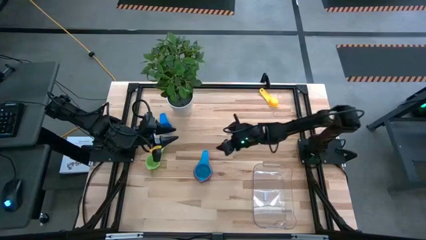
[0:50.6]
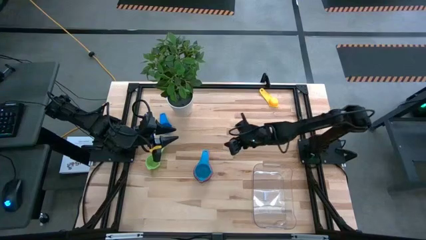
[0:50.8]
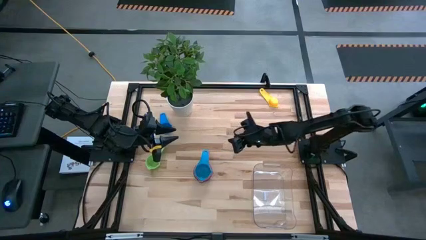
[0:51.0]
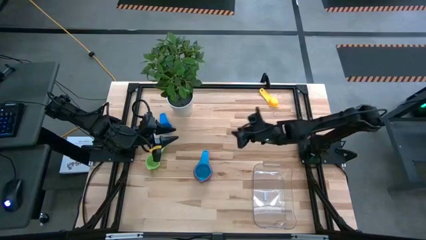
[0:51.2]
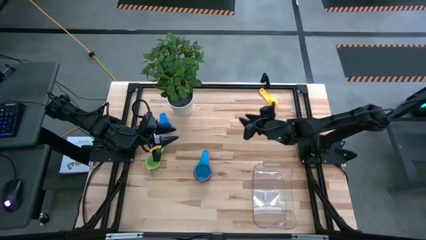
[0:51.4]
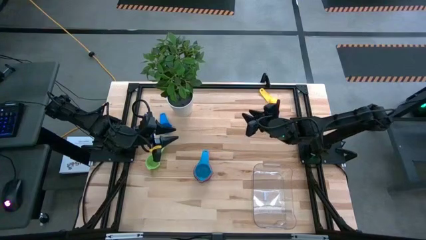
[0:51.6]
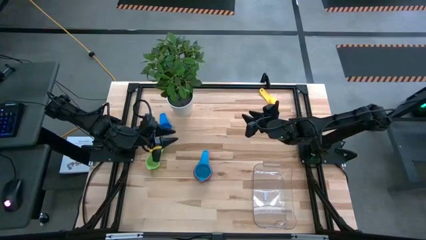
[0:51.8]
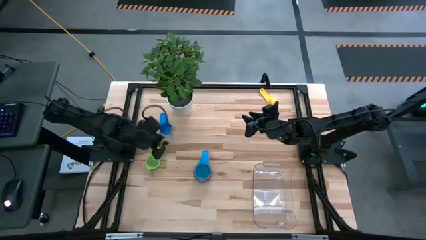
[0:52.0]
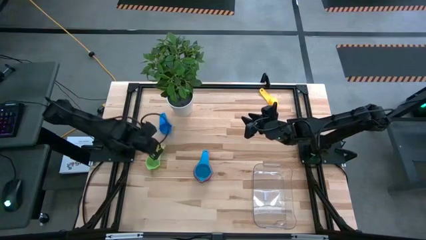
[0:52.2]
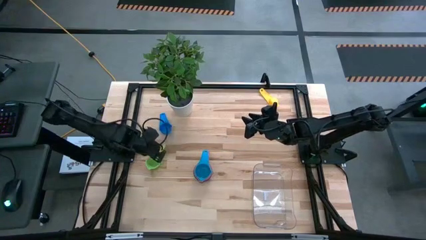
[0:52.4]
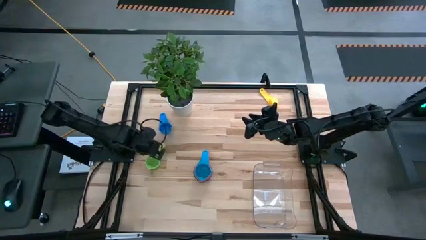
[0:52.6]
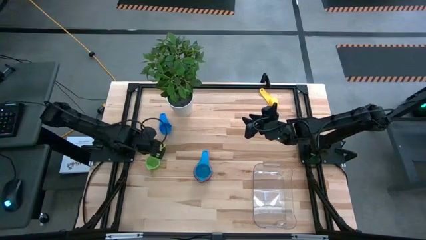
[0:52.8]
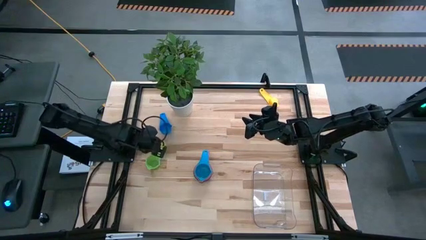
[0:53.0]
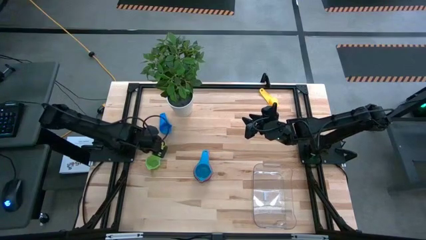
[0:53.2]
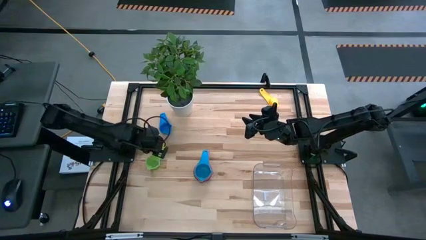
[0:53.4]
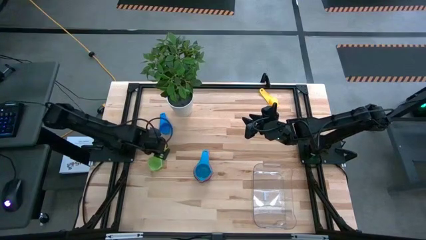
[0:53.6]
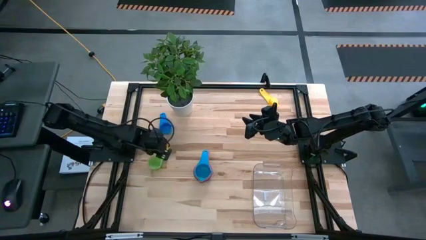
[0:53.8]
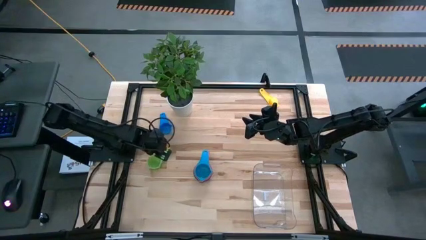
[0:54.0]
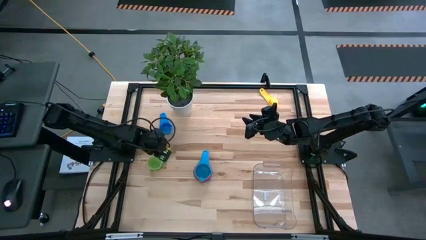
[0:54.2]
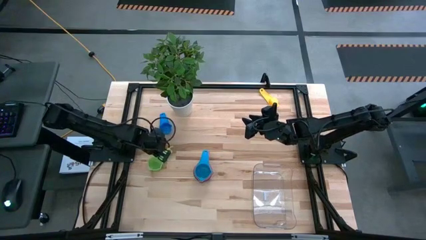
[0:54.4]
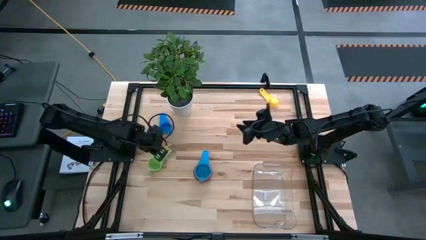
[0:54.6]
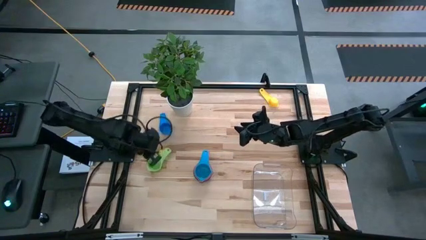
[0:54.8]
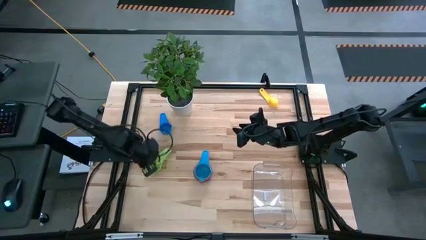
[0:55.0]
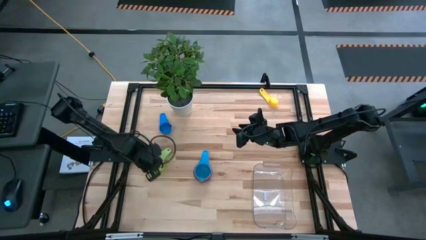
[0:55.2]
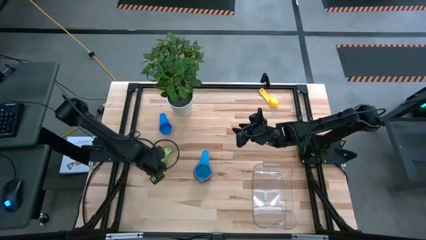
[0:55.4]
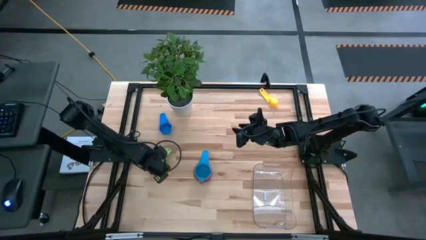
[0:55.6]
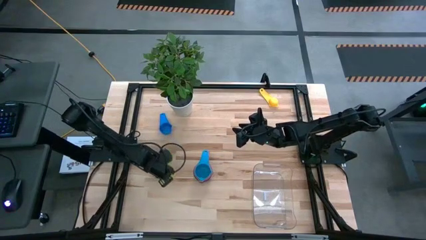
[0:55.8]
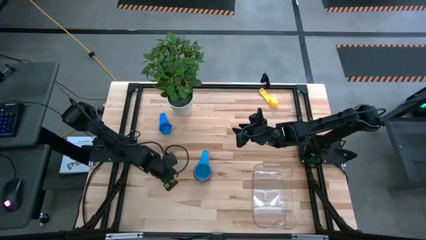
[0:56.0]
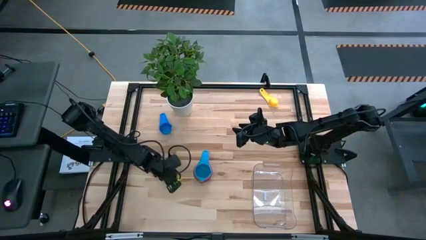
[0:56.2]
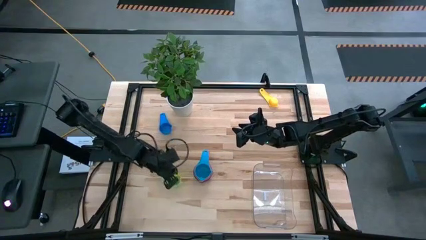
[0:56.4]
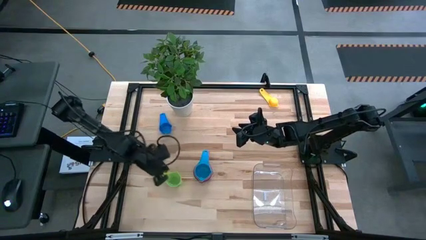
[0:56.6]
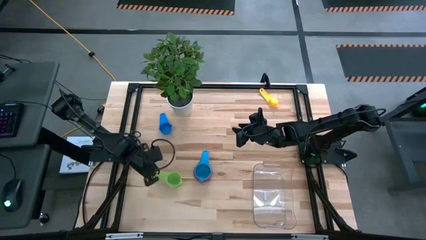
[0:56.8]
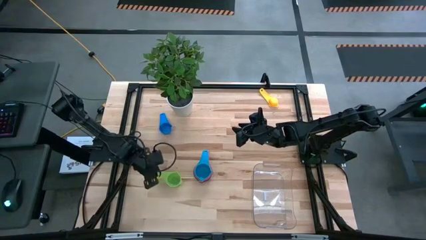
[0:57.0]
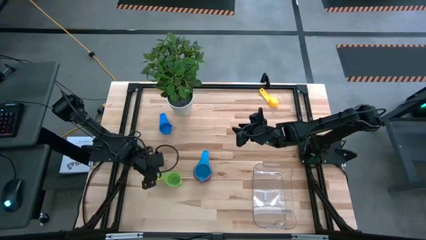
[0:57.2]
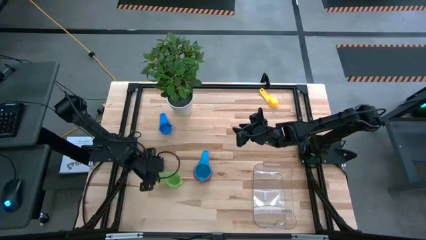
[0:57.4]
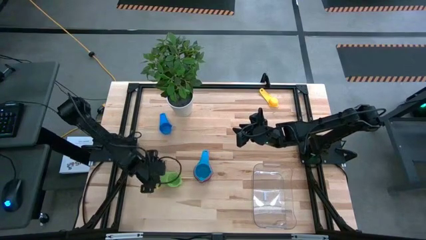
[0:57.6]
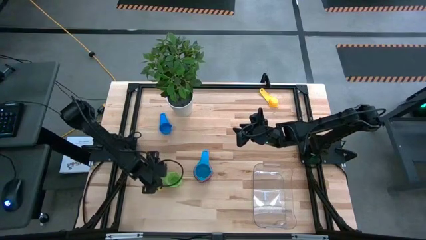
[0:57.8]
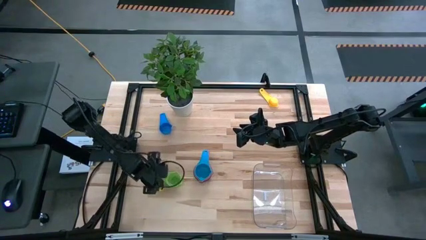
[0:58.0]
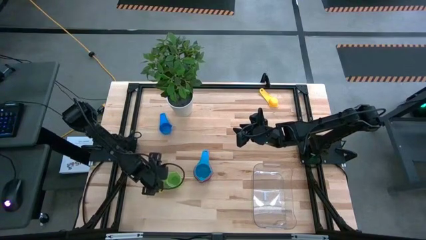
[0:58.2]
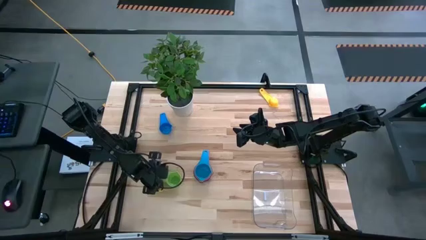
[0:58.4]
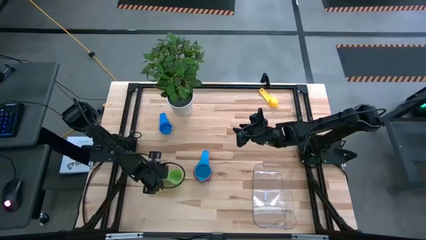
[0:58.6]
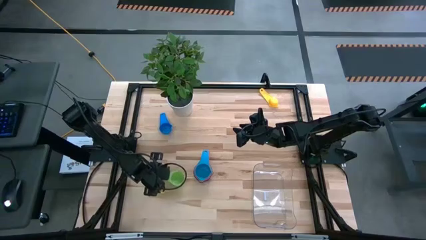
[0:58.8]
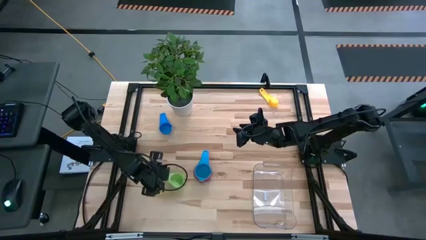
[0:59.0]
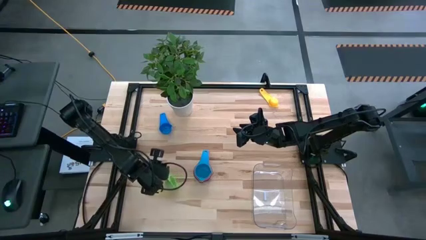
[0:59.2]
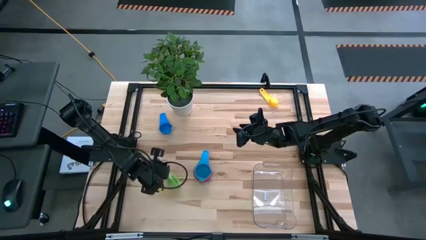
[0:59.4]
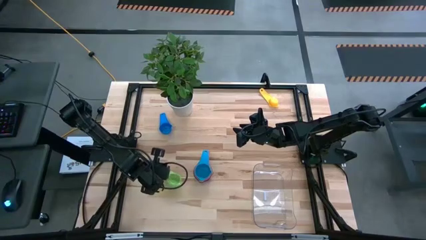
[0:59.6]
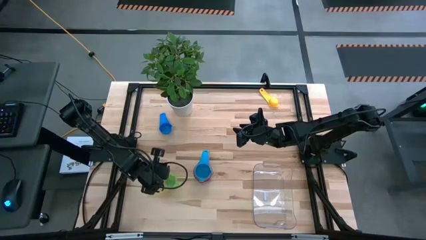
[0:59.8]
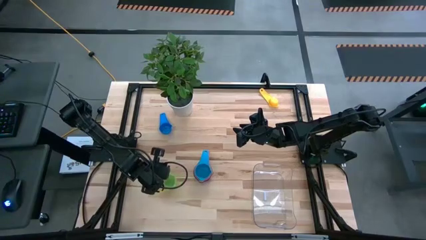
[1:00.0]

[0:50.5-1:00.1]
Task: Nest measuring cups in basket
Stack the green measuring cup on top of the light blue measuring cup
